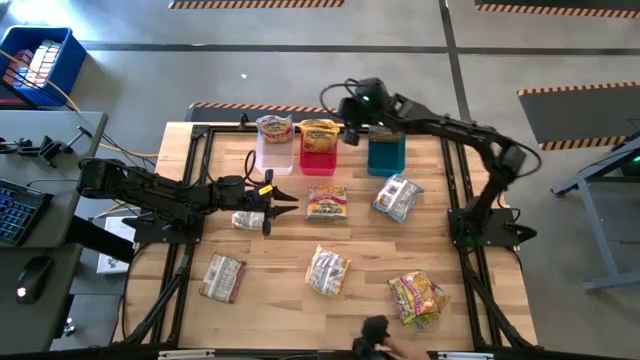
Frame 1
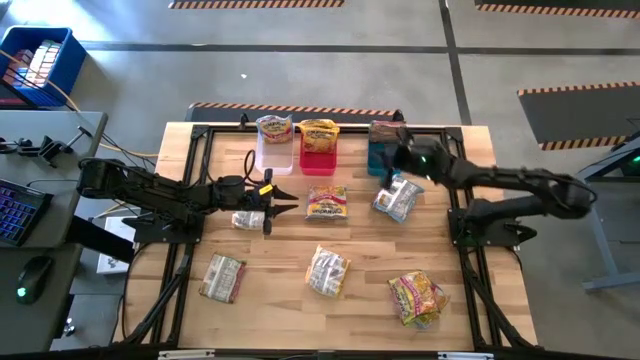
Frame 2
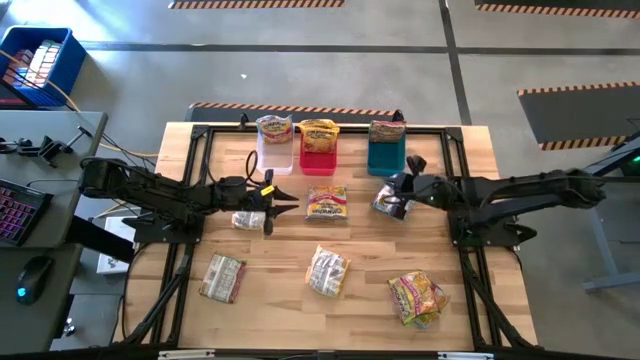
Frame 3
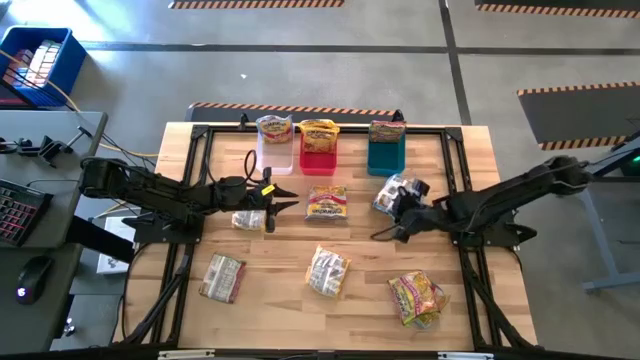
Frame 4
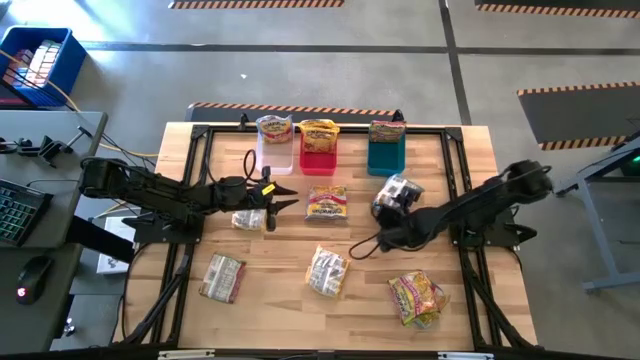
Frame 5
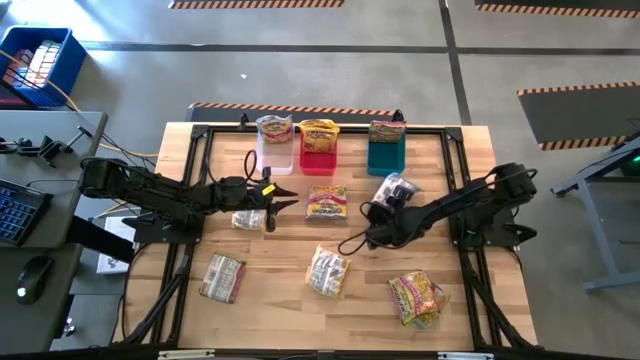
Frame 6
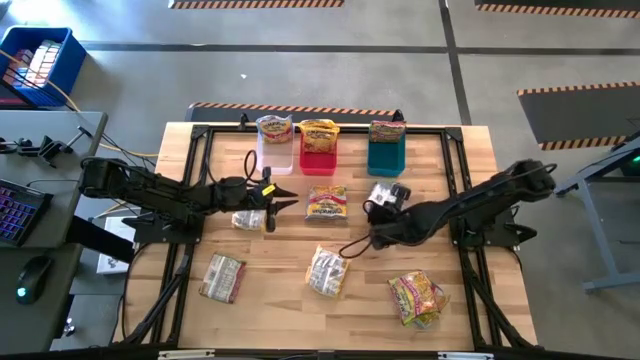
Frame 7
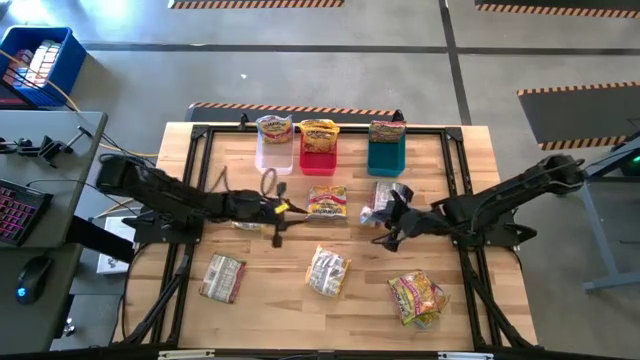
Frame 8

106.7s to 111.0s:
Task: Sort Maruchan noodles
Put the blue noodle pack into the transparent bin

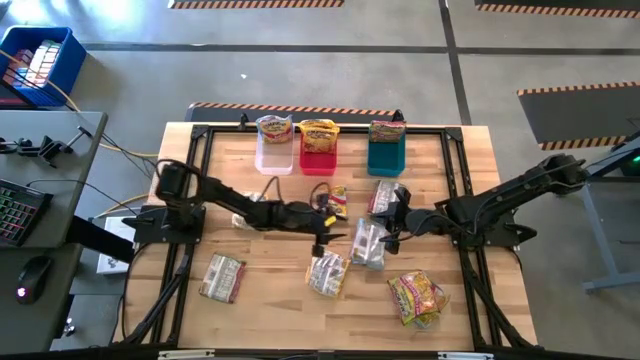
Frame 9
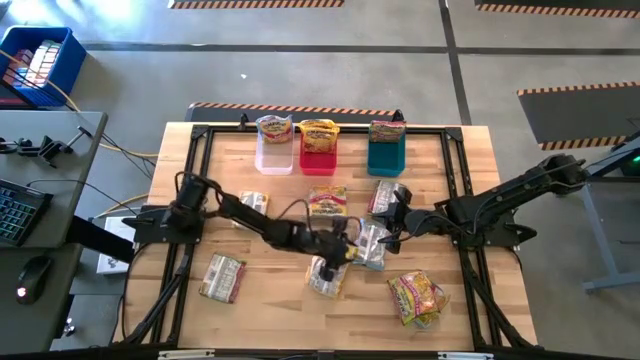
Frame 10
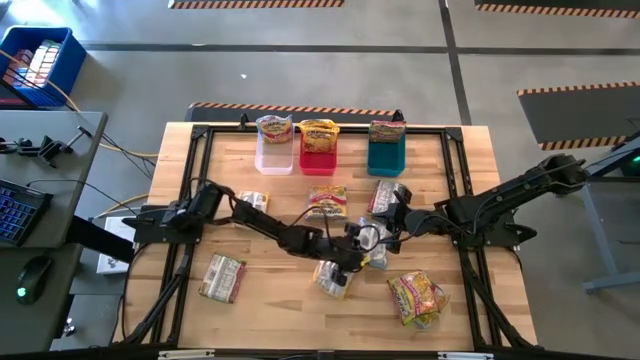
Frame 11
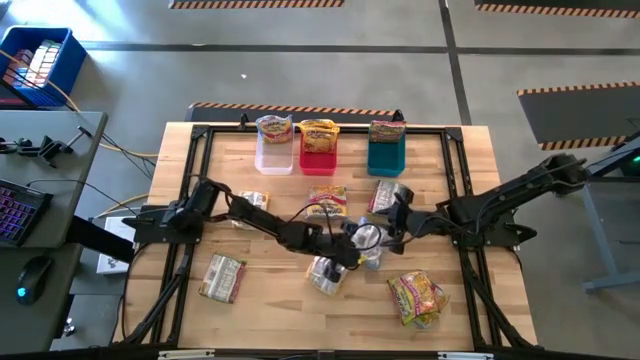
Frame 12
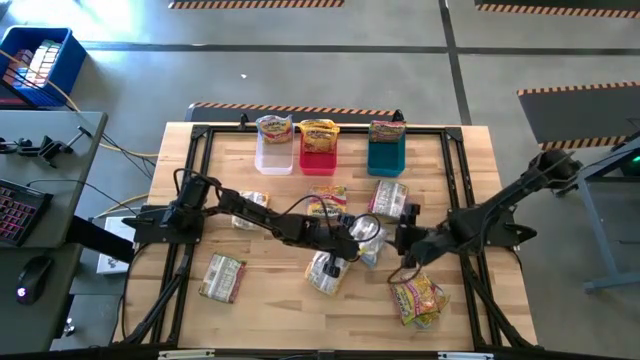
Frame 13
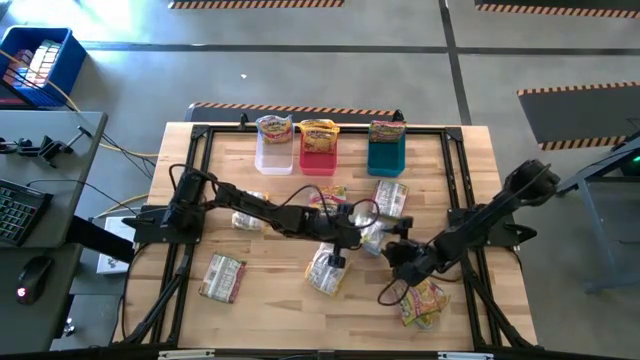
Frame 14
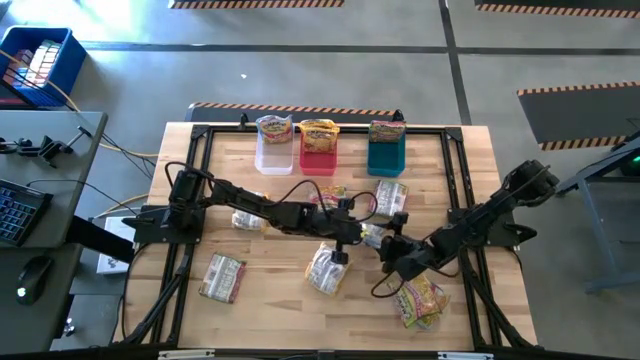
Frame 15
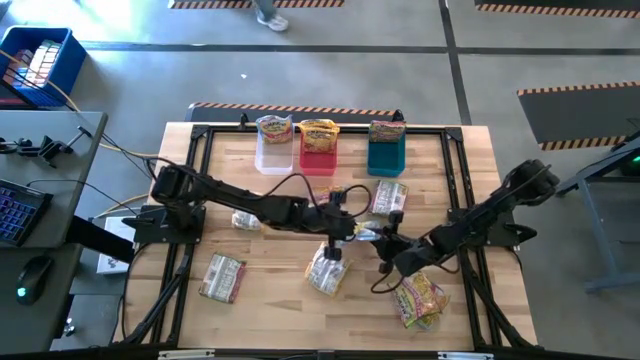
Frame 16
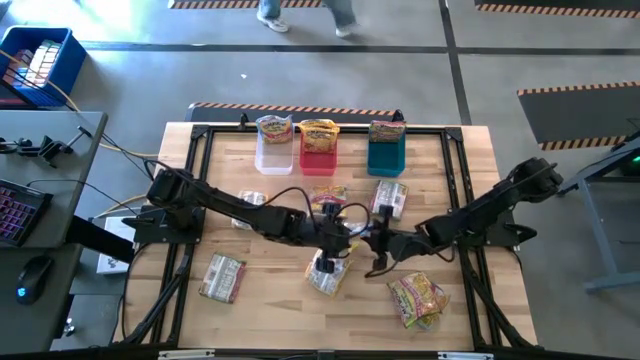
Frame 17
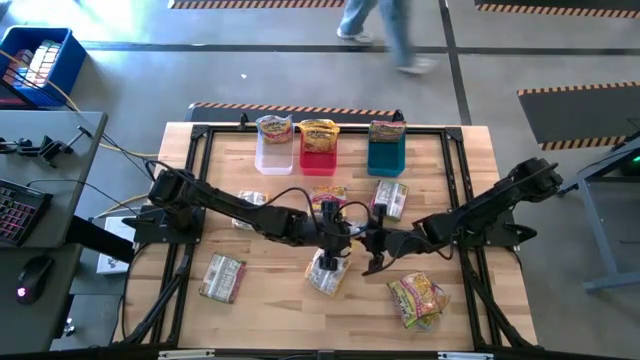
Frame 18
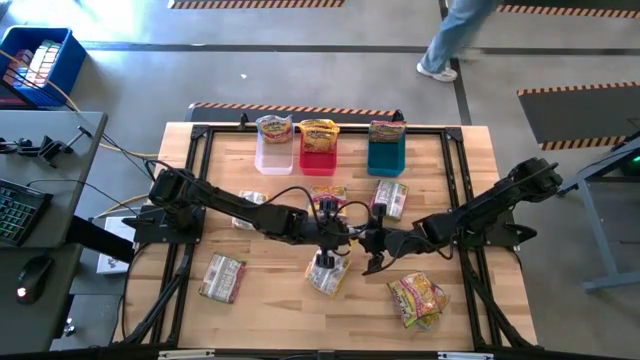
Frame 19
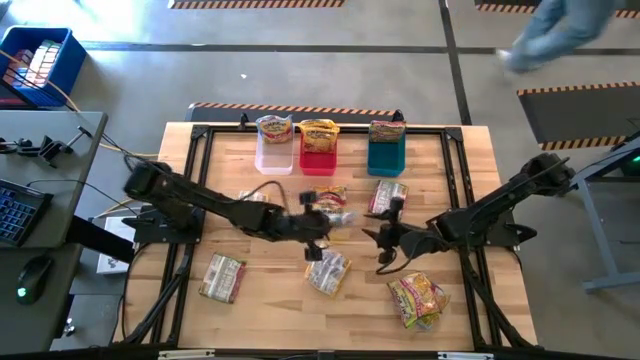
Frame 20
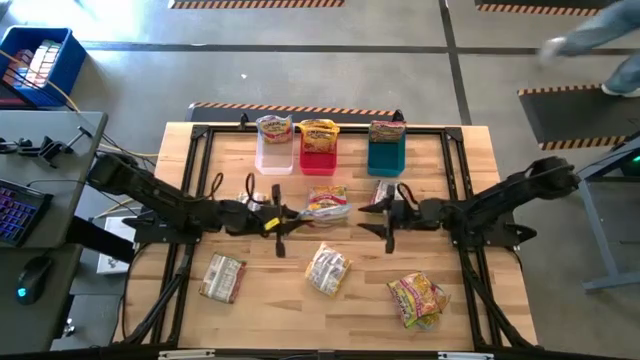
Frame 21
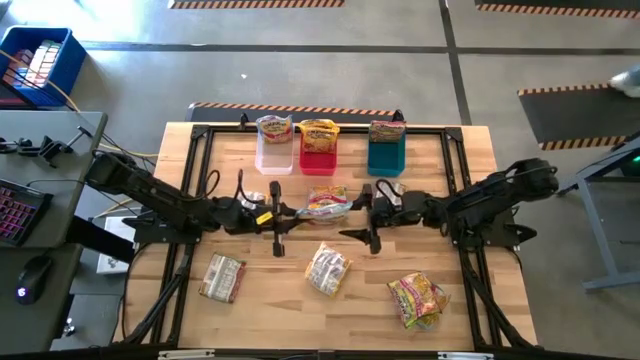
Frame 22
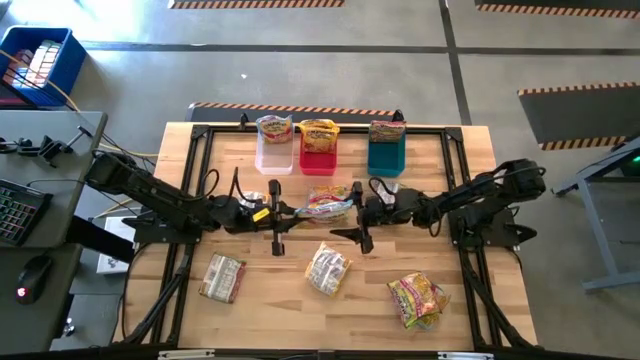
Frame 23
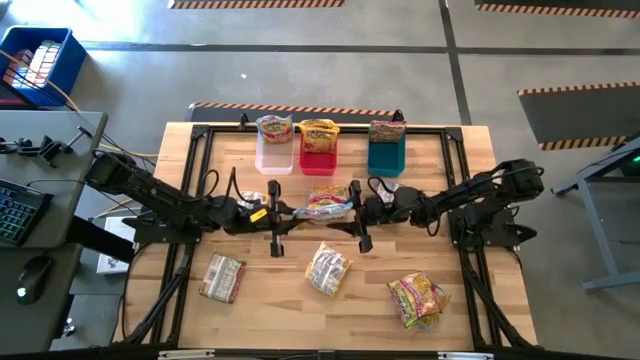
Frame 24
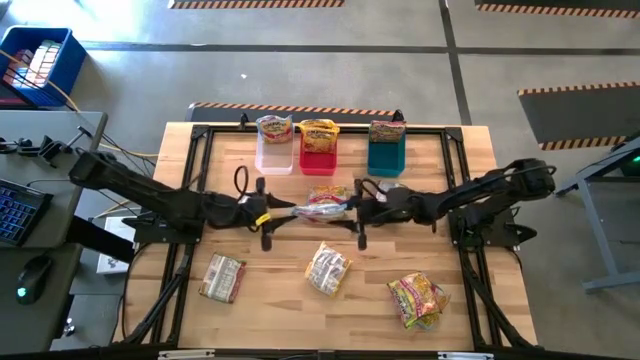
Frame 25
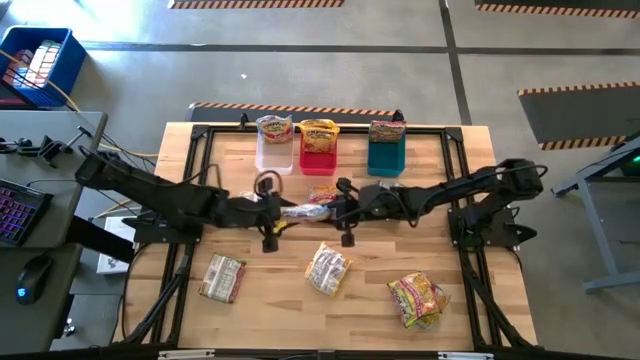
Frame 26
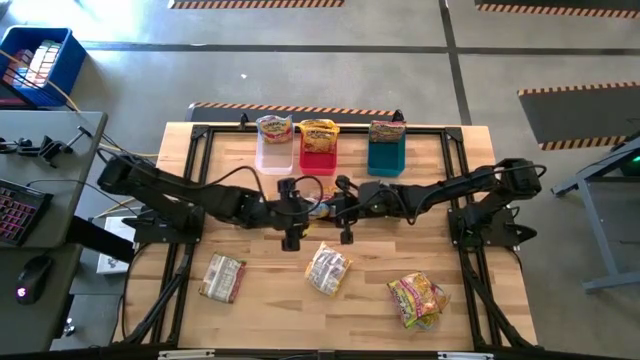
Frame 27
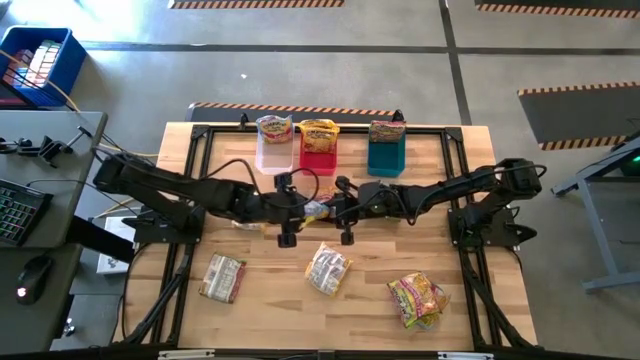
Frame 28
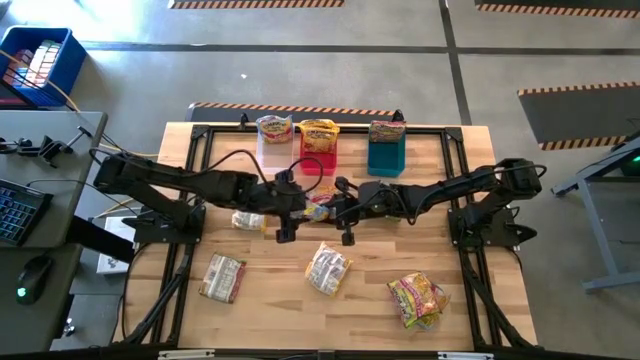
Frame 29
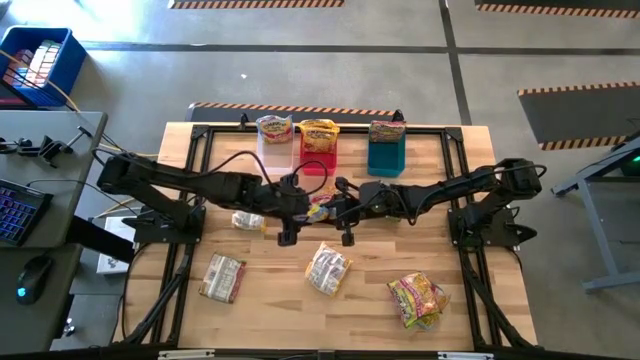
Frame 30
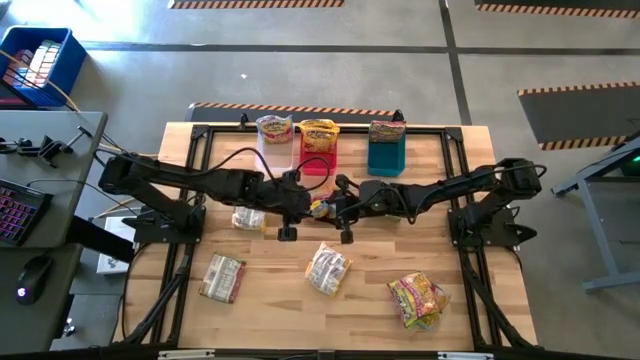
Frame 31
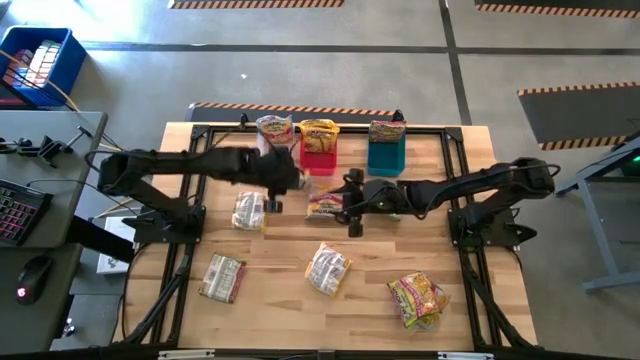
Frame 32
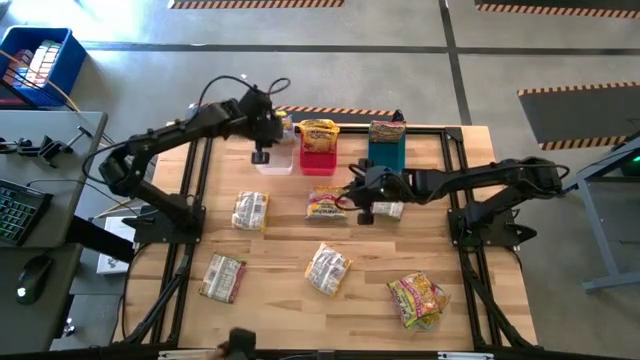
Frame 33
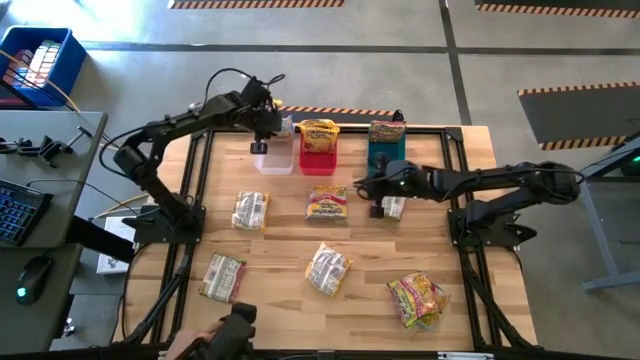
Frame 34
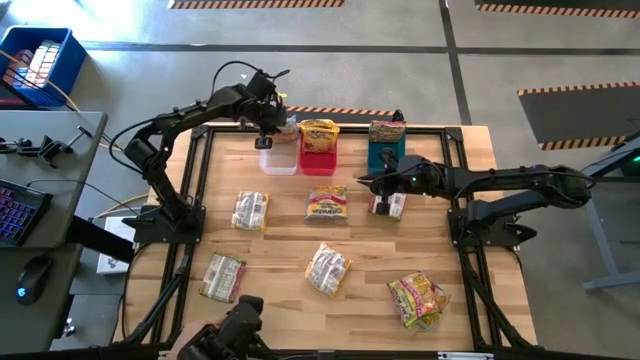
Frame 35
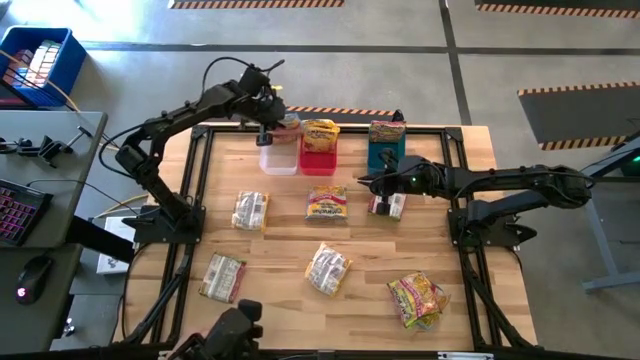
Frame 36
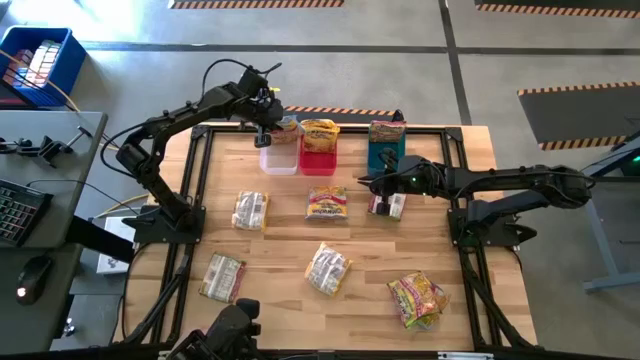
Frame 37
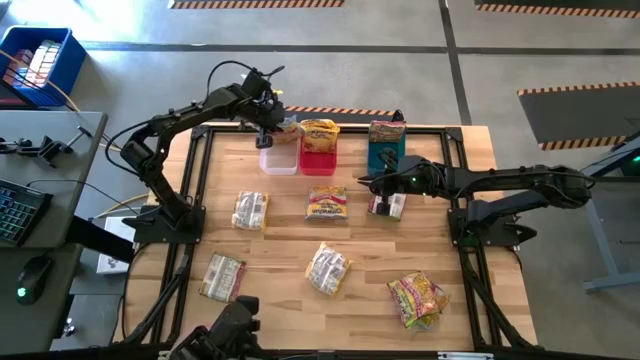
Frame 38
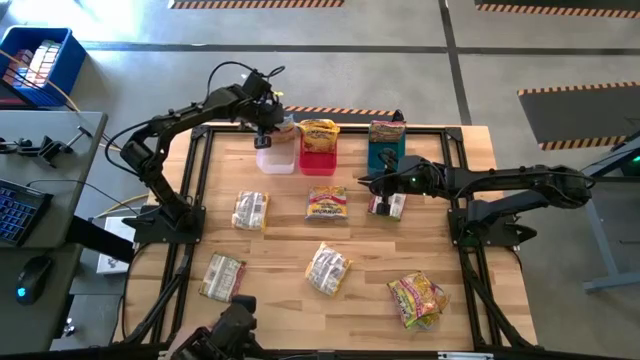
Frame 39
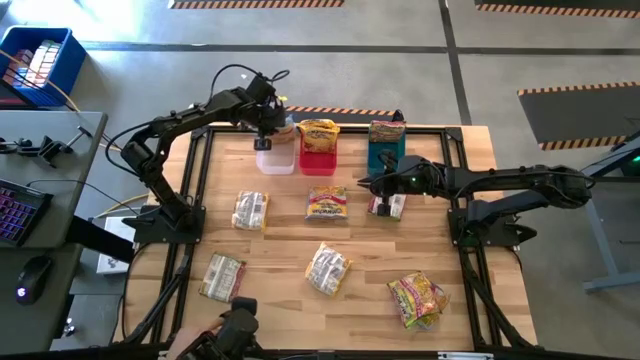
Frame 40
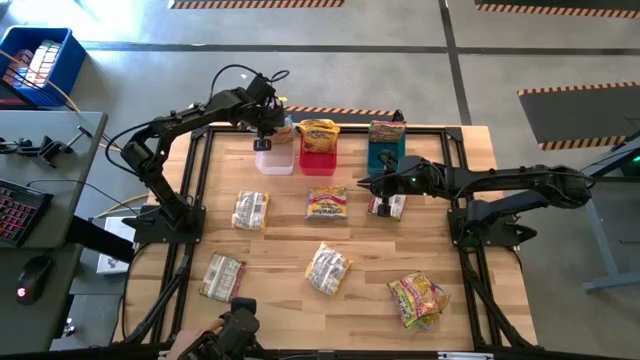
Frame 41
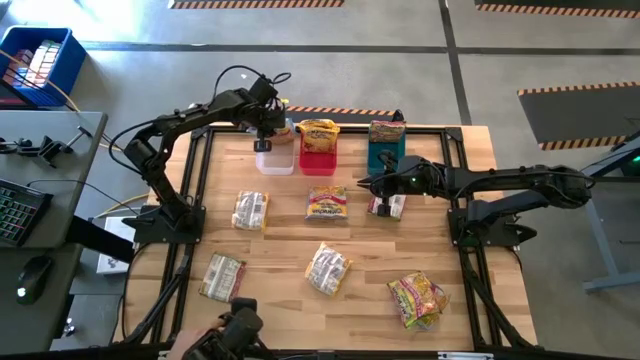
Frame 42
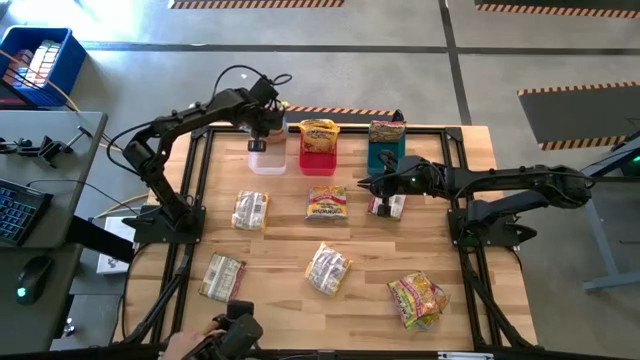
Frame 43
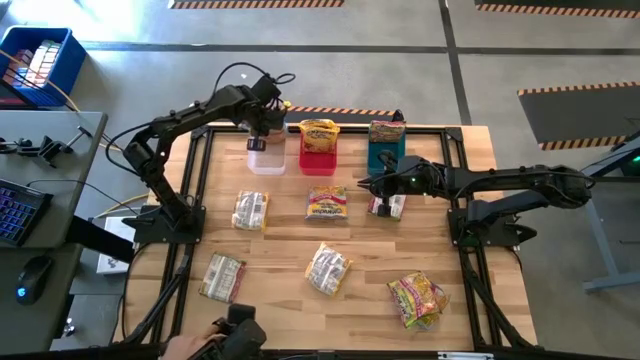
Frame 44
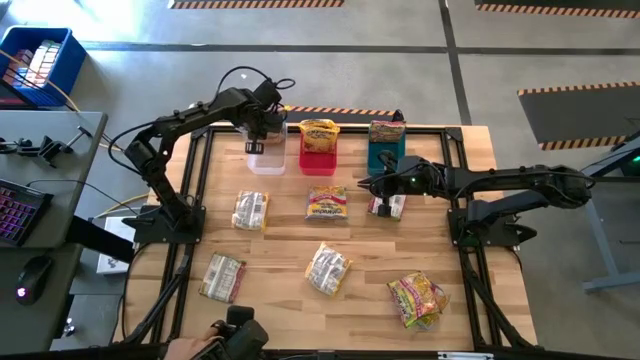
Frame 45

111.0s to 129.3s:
Put the blue noodle pack into the transparent bin
